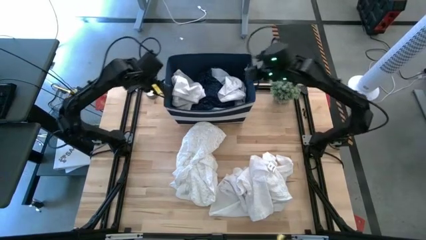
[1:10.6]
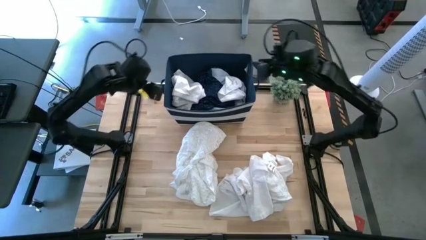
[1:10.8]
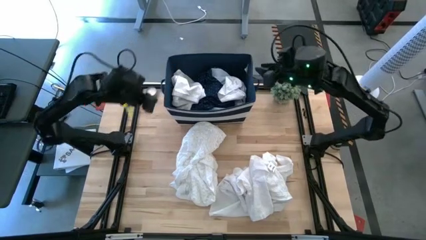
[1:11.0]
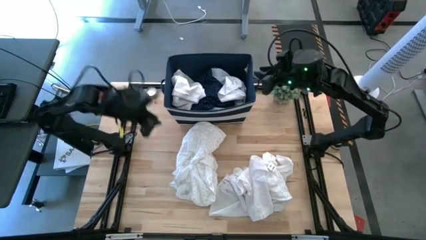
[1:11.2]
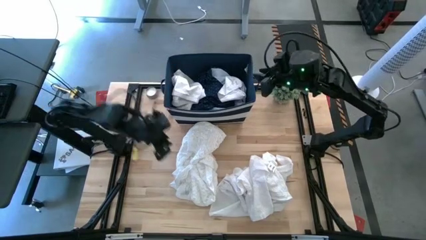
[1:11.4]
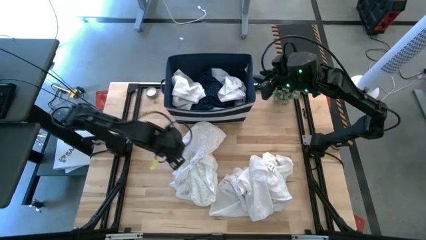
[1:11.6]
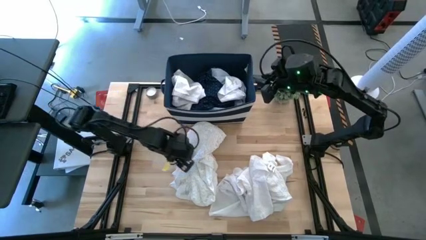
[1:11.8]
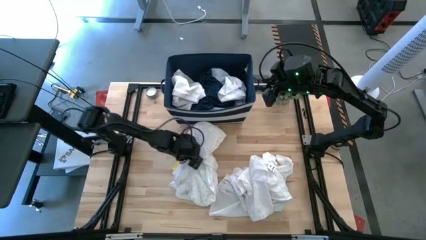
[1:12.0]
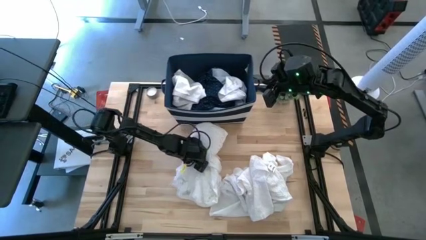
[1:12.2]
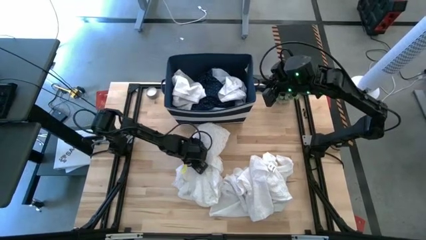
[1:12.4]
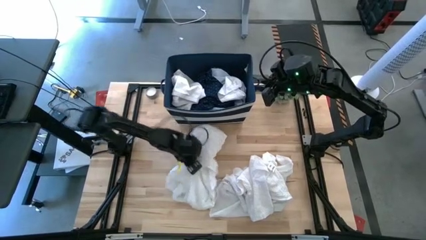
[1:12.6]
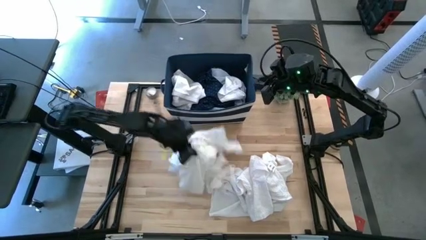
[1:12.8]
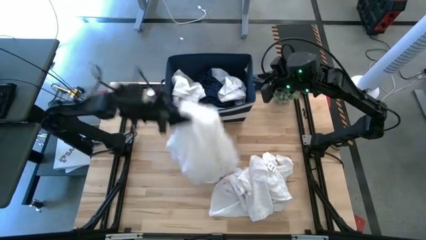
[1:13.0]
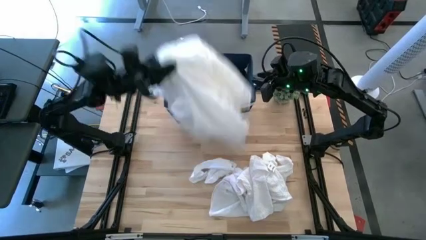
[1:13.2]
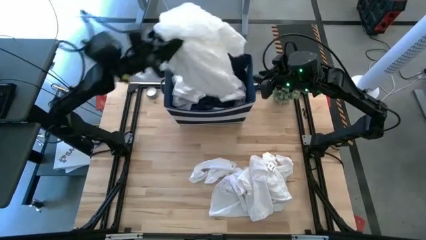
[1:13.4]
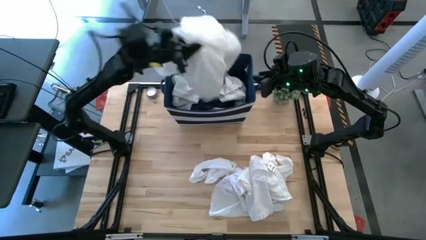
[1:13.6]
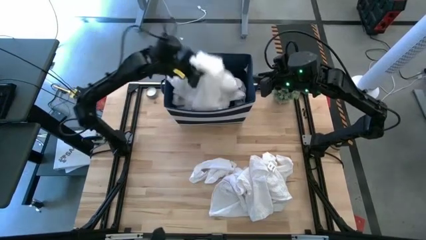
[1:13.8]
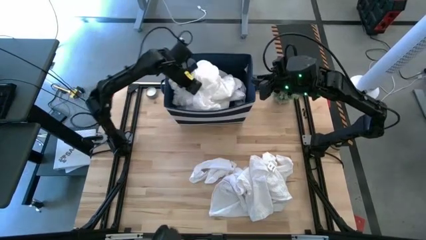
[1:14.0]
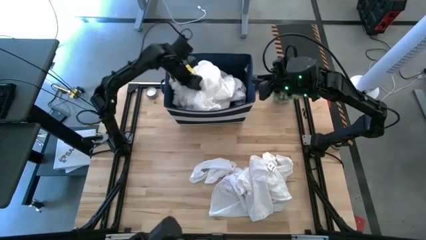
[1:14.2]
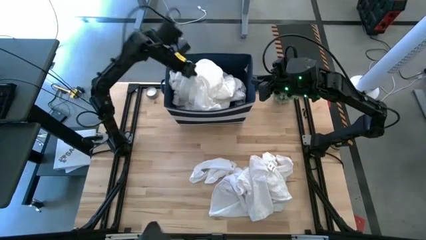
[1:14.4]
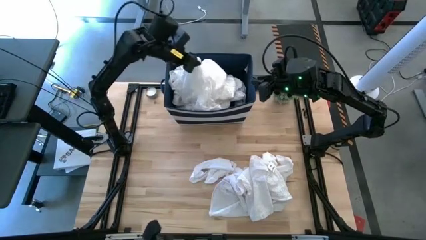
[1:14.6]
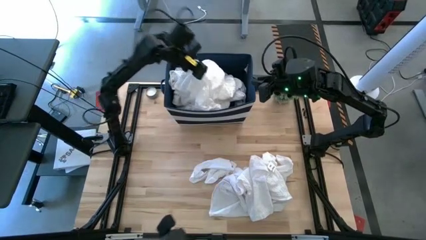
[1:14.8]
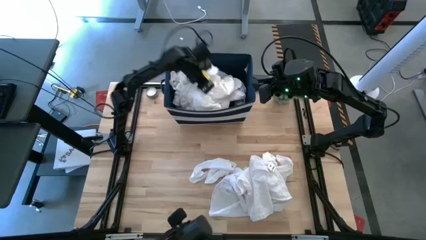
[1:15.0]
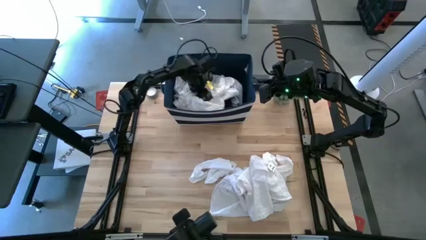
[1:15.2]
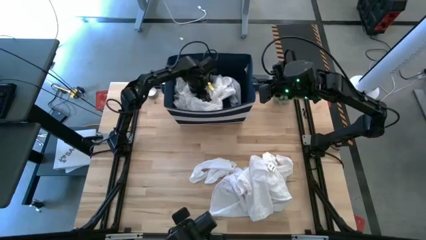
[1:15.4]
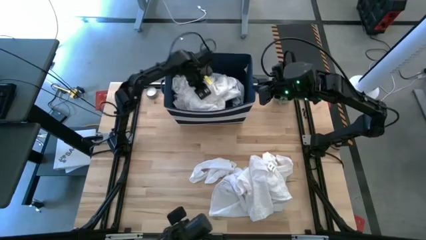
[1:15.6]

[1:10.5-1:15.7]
Task: Sort clothes
Put the white dress into the blue bin

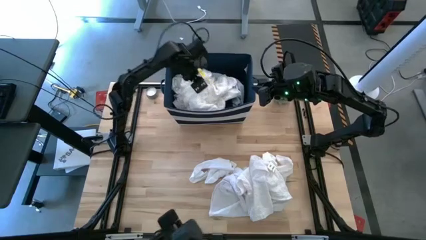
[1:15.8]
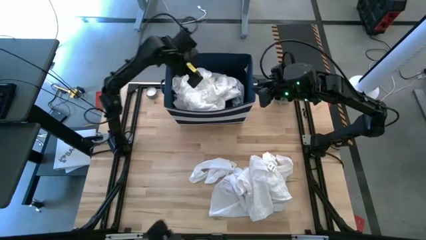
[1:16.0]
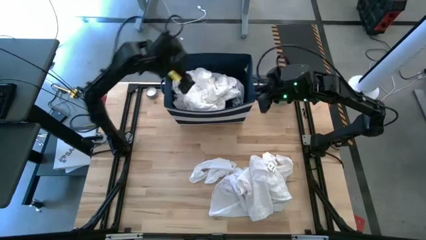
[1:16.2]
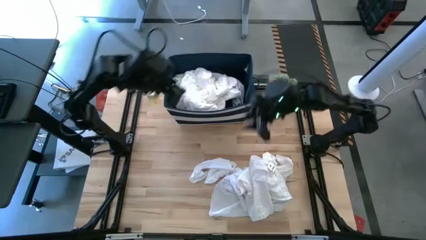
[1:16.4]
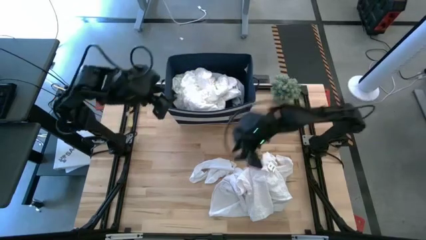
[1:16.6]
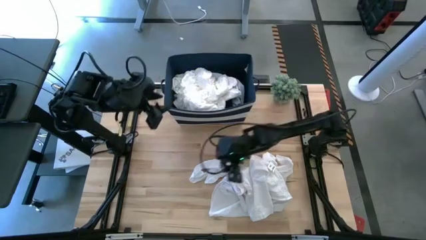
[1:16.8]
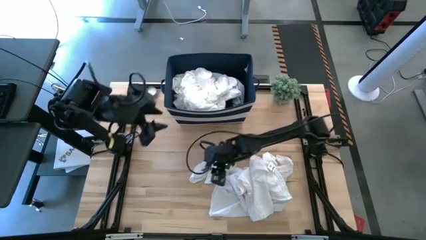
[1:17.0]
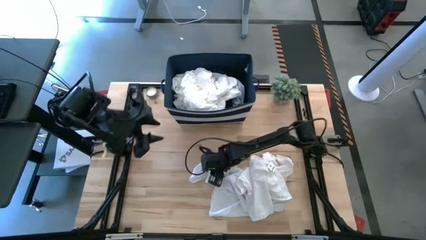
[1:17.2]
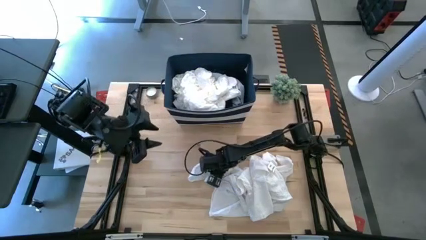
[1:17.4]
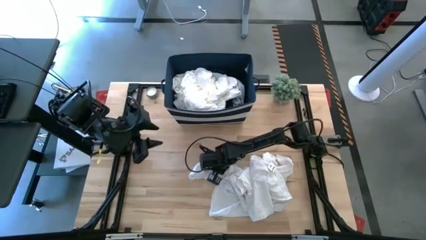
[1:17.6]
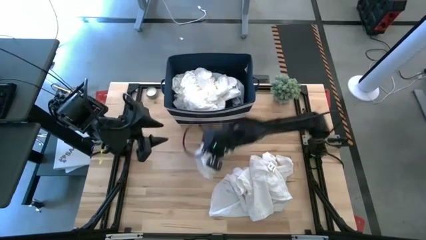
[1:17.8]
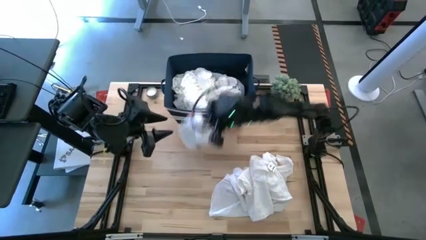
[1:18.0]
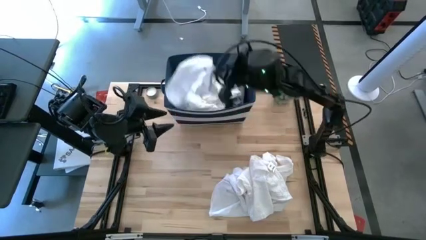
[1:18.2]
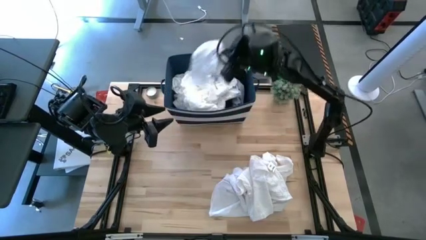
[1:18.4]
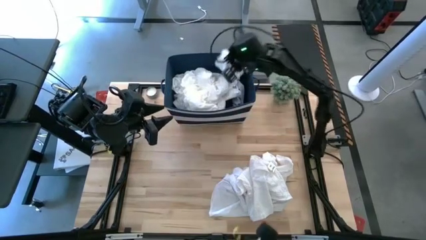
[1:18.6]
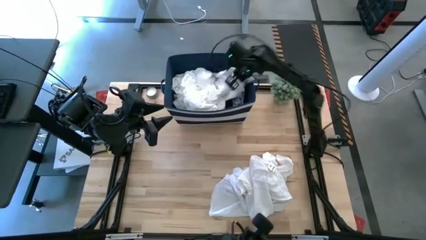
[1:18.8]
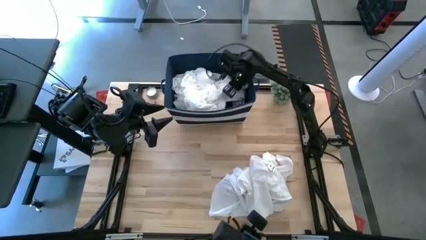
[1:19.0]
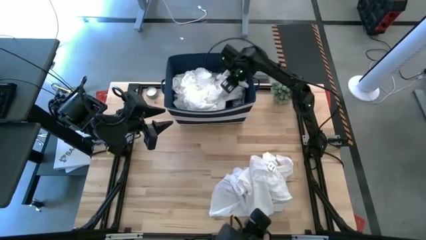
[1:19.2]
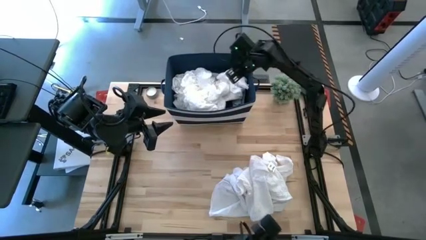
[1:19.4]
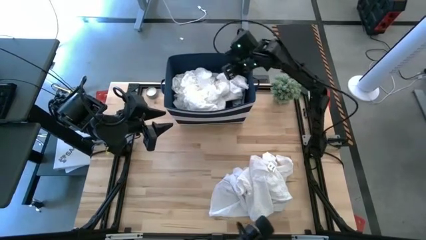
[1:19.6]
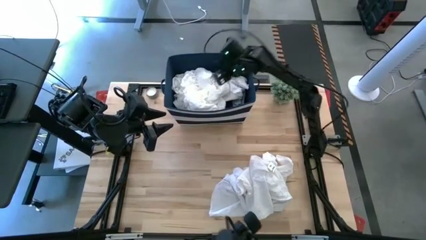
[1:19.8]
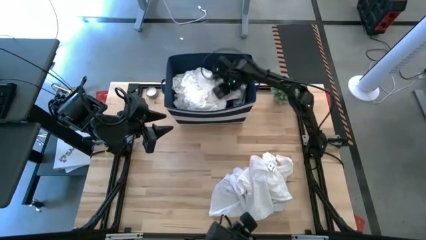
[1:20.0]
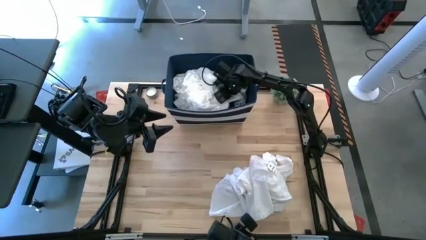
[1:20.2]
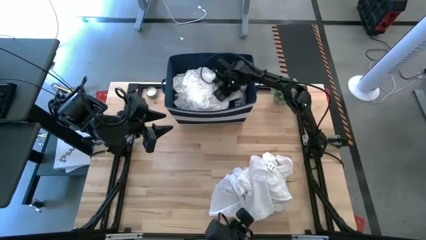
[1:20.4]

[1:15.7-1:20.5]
Put the white sock into the blue bin

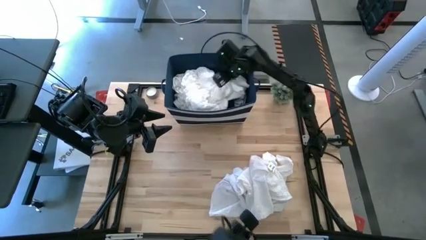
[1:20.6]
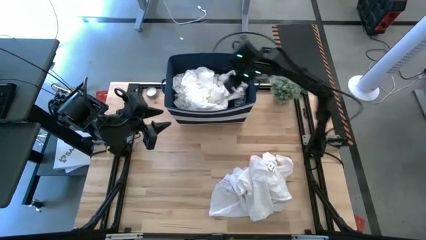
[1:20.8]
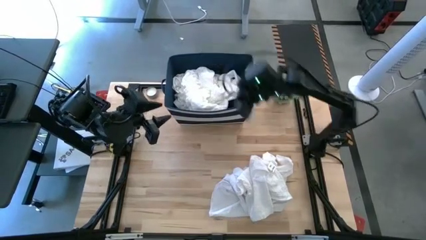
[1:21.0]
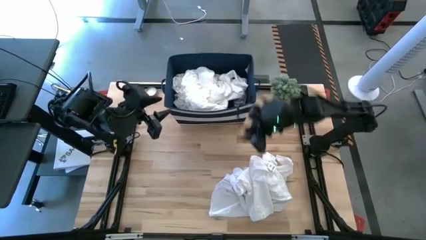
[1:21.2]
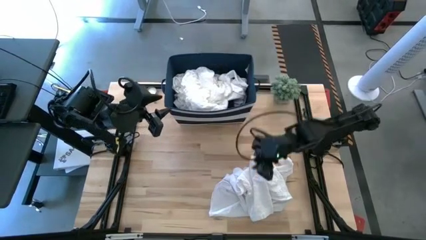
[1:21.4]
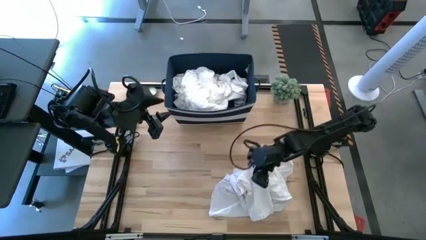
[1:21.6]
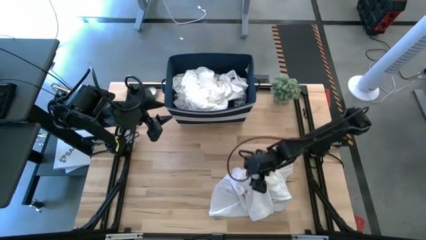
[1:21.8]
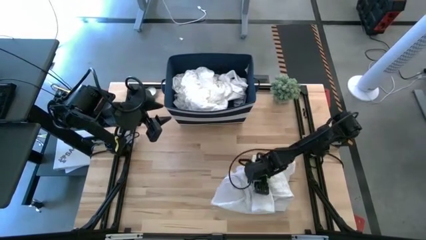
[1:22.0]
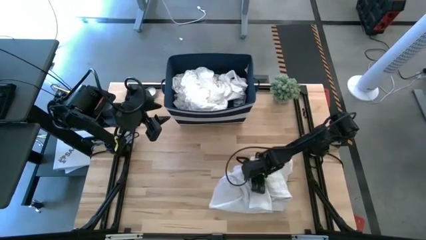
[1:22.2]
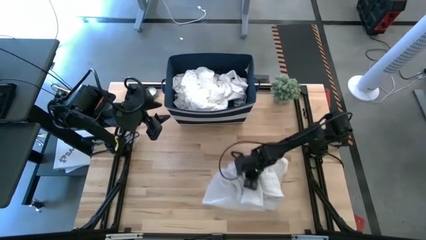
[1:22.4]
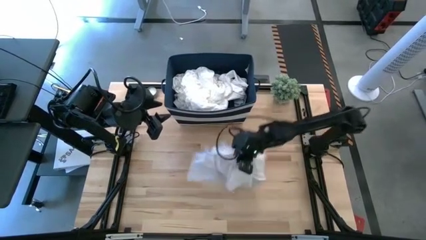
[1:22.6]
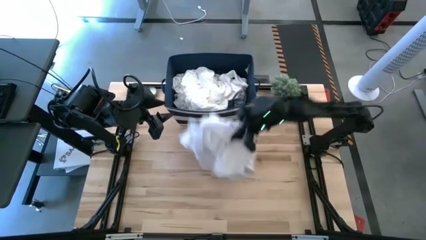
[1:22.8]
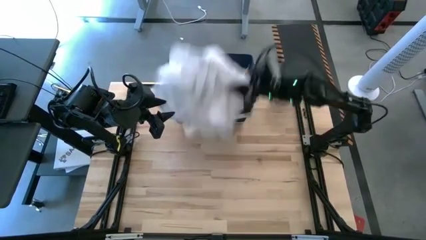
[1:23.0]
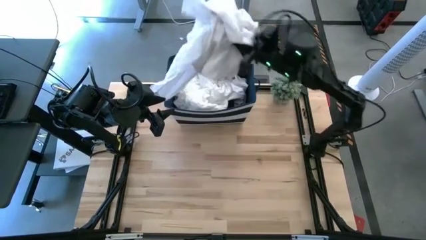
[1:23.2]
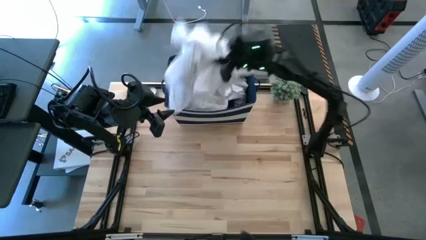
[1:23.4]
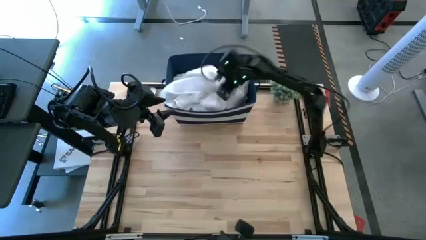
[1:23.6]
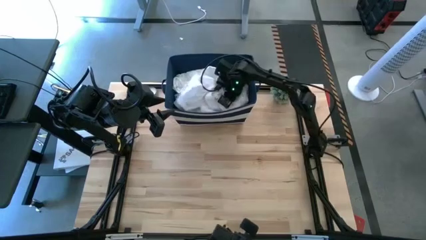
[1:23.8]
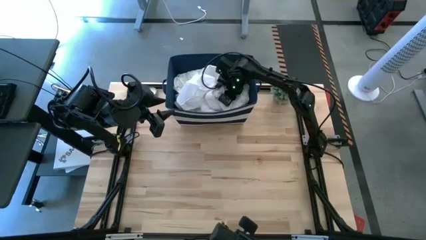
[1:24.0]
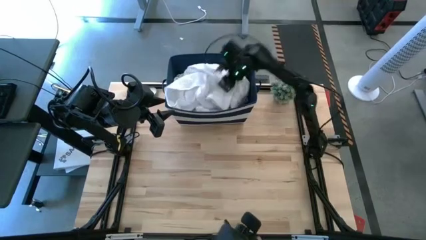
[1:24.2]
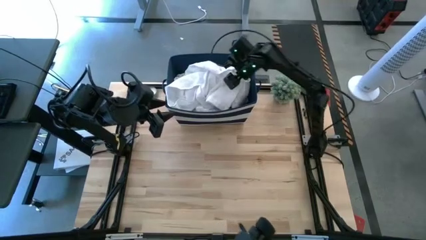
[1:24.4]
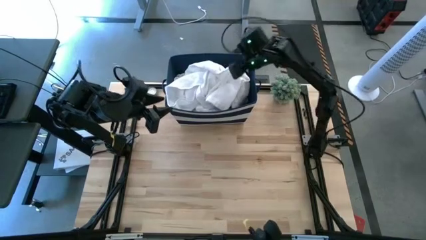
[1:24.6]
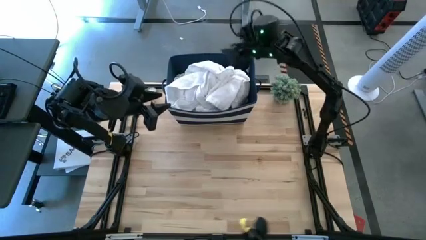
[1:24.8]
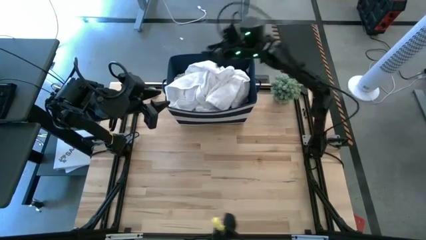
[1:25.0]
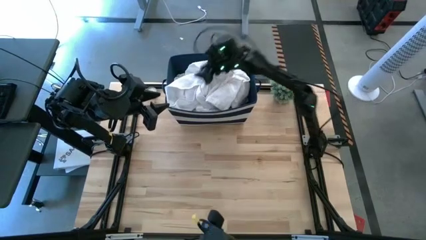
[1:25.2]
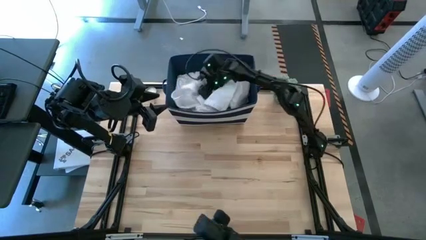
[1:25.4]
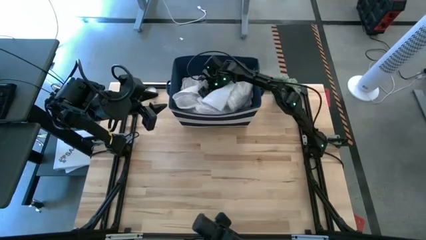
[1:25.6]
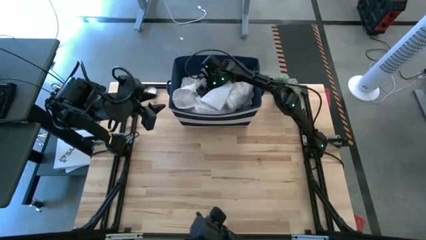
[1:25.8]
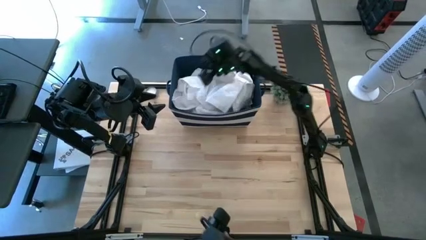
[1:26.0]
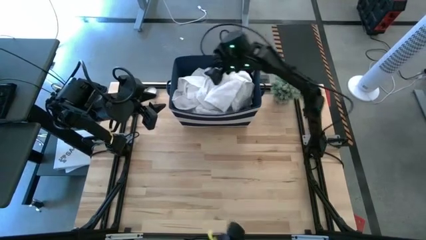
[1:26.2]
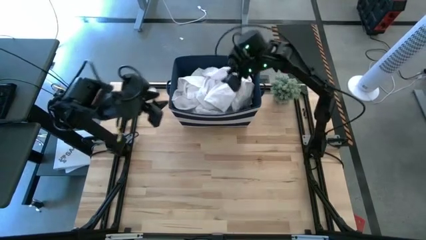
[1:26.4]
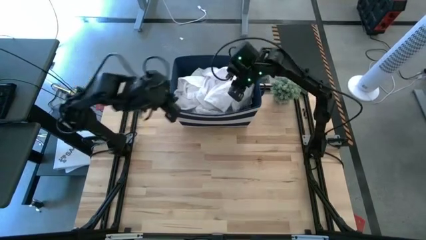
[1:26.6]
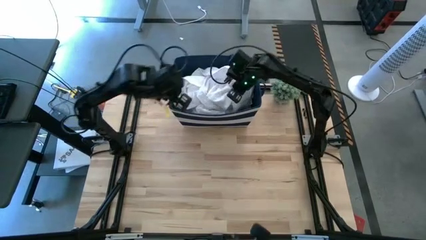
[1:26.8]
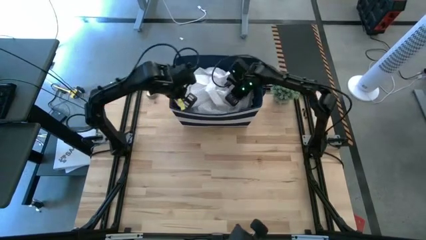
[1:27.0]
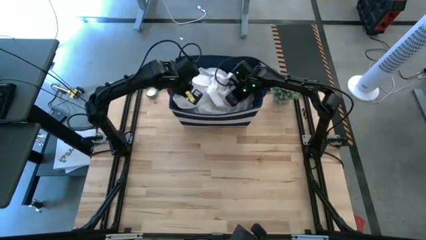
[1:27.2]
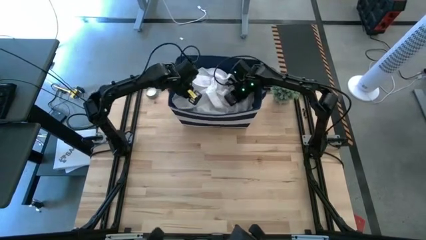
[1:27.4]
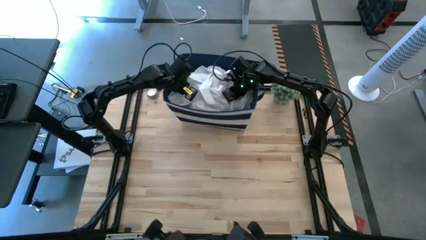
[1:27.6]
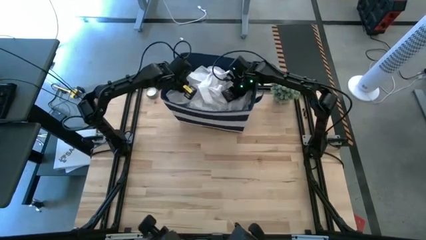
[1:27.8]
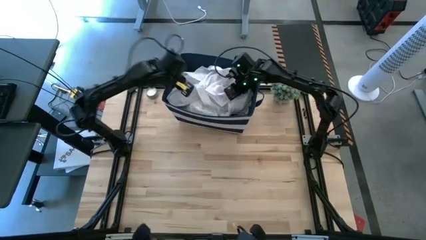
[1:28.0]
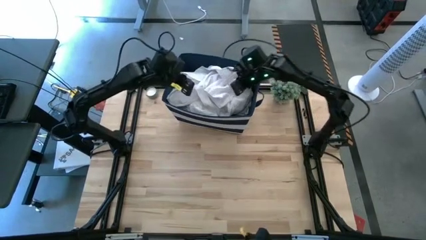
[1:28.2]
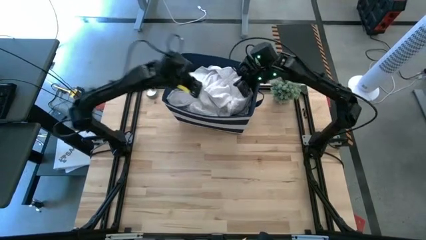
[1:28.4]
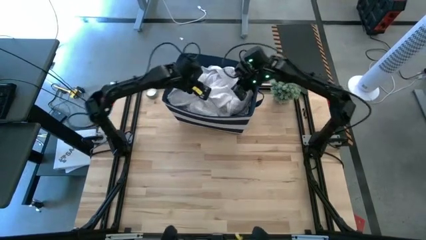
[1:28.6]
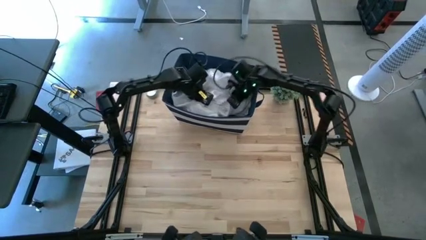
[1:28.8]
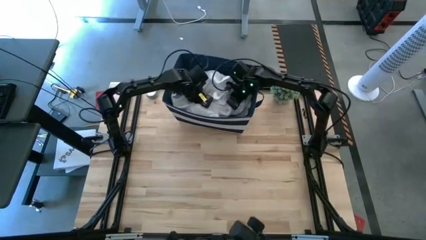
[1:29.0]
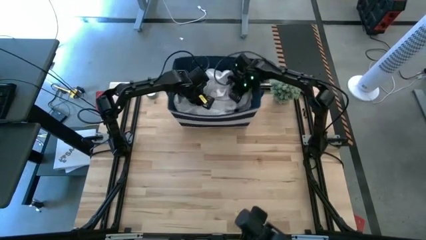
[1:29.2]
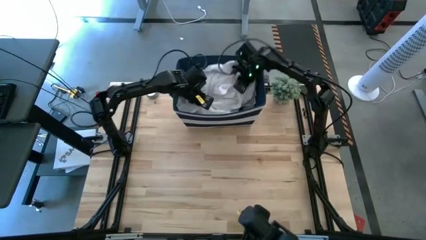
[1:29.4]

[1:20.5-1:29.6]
Put the white shirt into the blue bin
